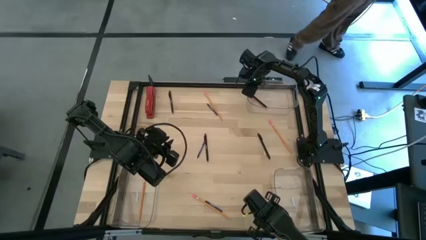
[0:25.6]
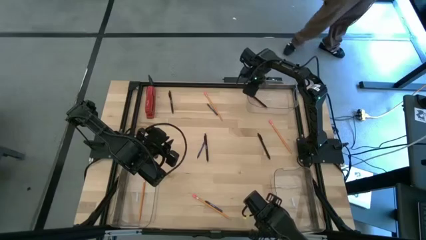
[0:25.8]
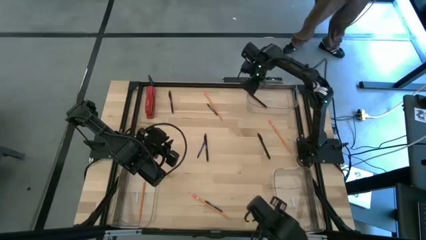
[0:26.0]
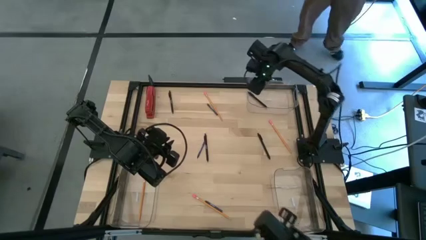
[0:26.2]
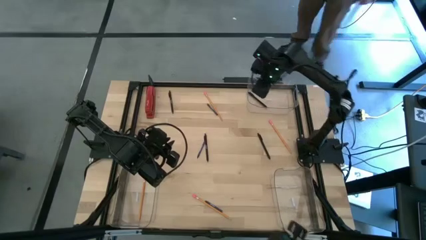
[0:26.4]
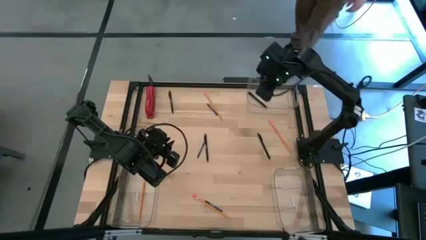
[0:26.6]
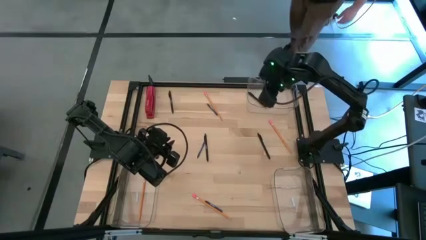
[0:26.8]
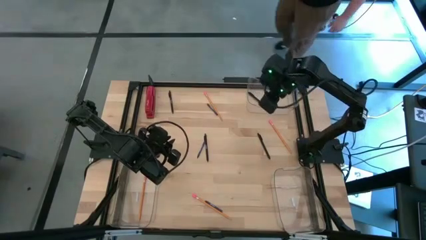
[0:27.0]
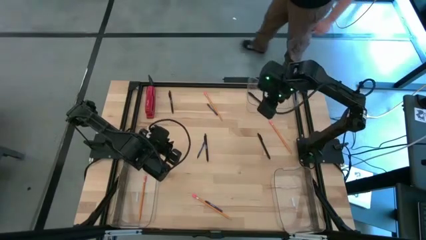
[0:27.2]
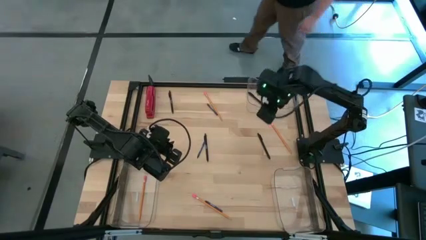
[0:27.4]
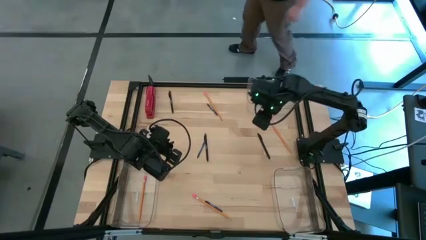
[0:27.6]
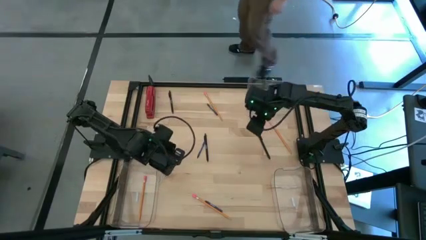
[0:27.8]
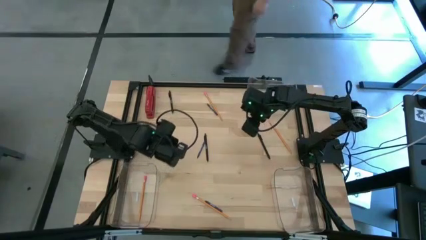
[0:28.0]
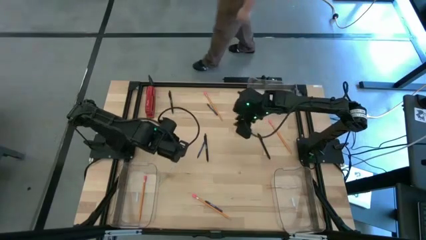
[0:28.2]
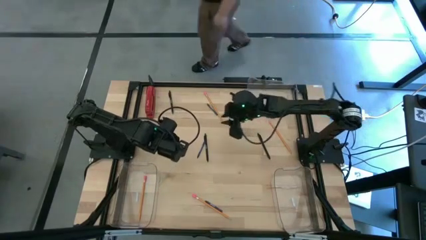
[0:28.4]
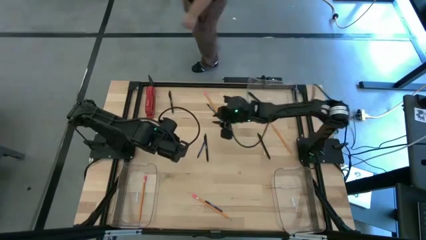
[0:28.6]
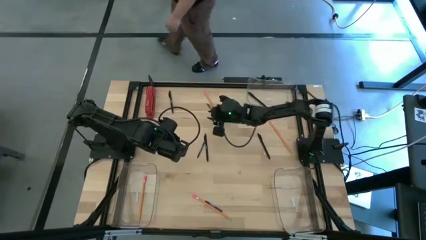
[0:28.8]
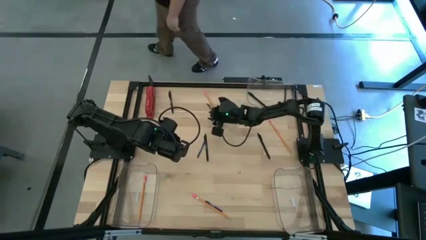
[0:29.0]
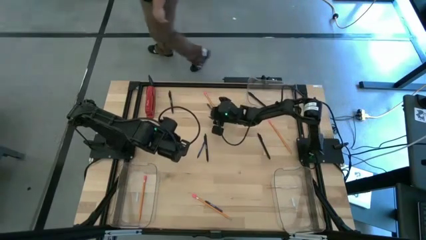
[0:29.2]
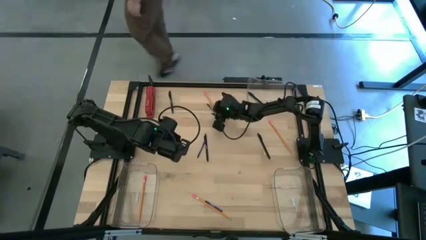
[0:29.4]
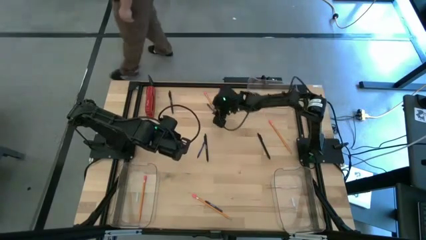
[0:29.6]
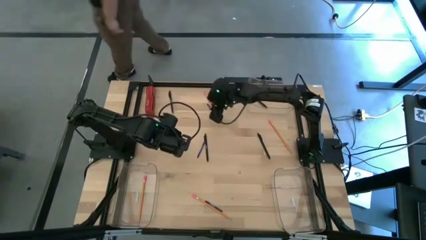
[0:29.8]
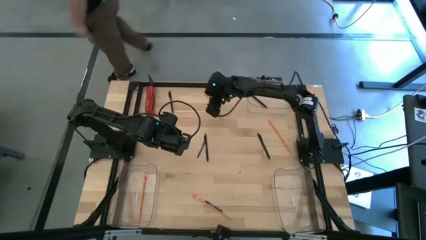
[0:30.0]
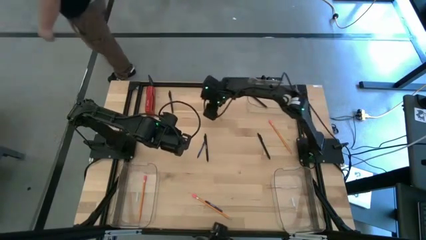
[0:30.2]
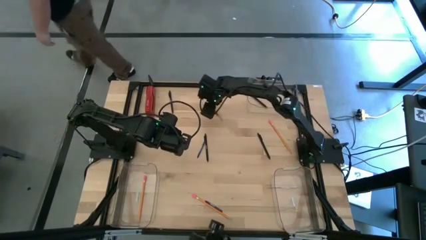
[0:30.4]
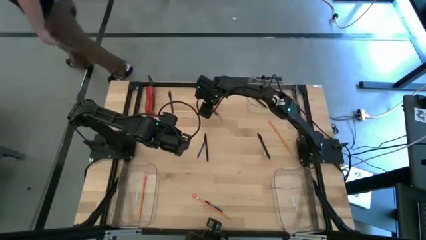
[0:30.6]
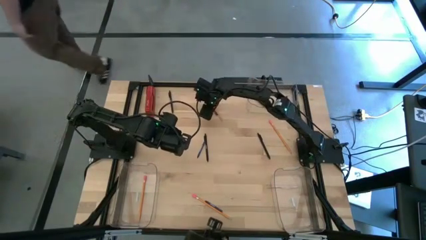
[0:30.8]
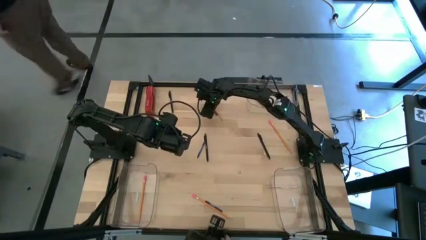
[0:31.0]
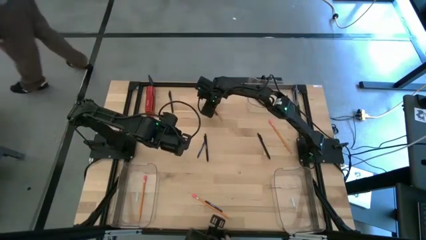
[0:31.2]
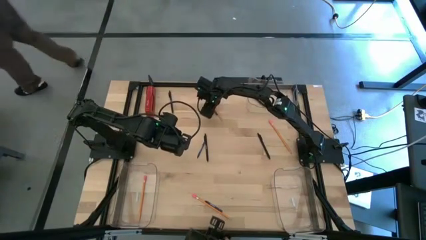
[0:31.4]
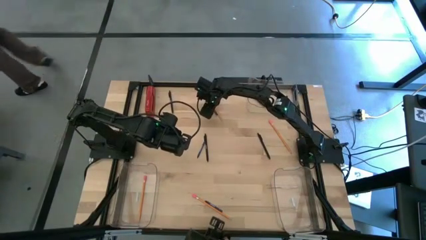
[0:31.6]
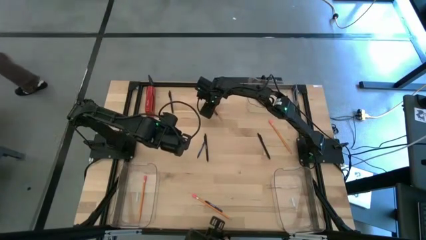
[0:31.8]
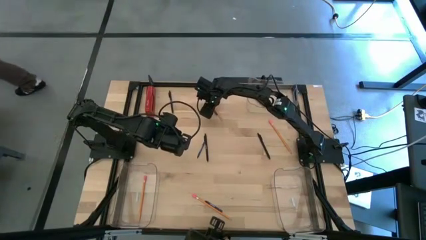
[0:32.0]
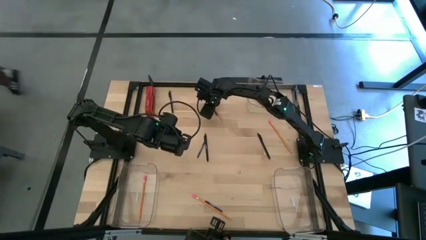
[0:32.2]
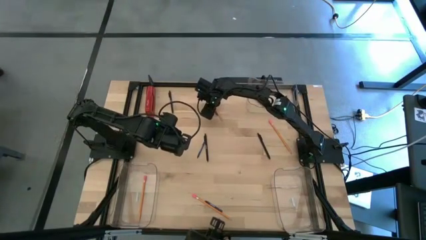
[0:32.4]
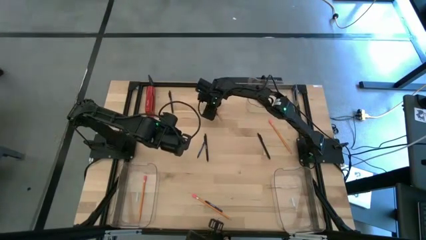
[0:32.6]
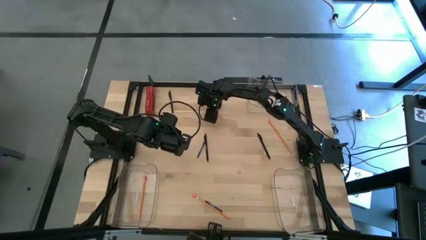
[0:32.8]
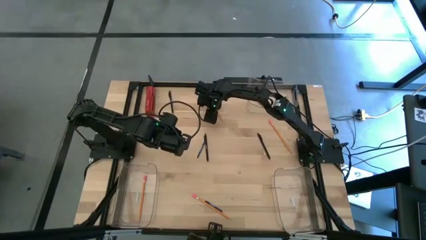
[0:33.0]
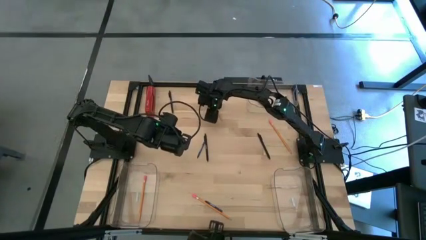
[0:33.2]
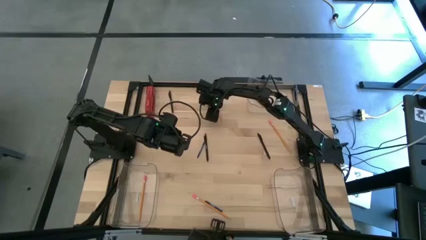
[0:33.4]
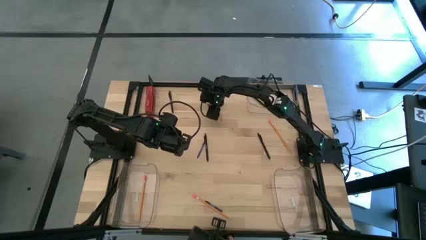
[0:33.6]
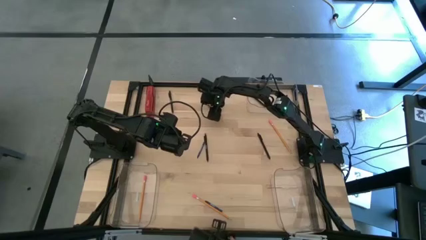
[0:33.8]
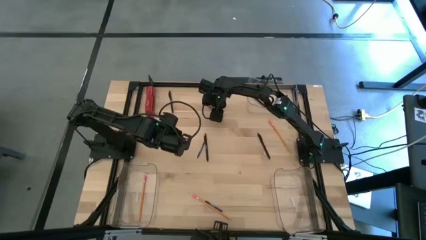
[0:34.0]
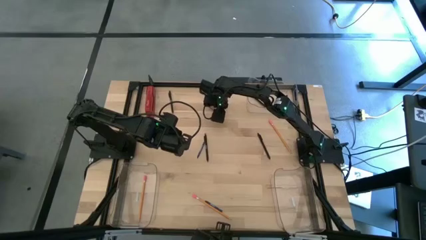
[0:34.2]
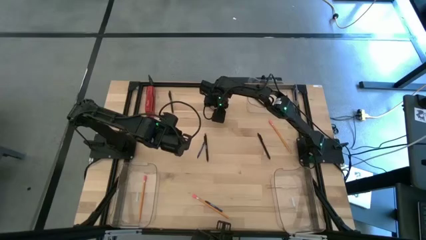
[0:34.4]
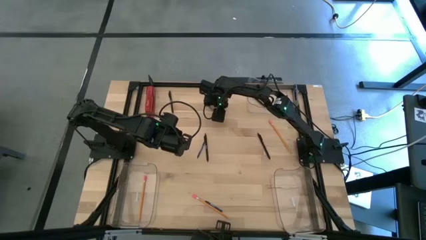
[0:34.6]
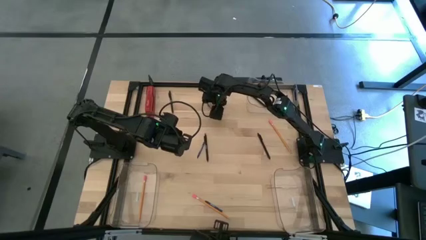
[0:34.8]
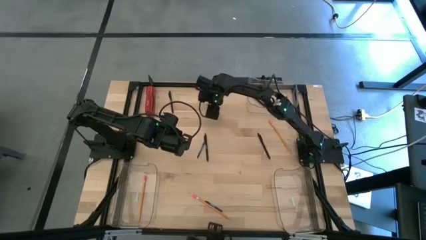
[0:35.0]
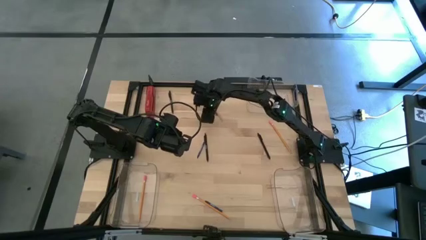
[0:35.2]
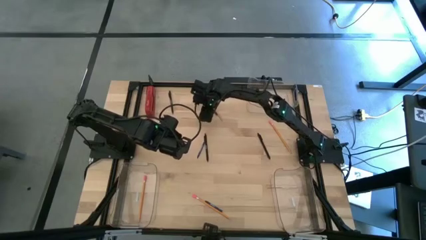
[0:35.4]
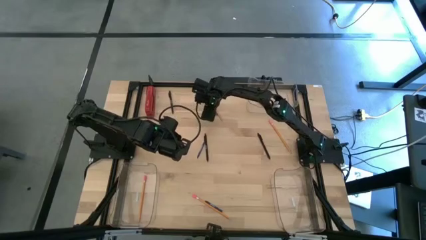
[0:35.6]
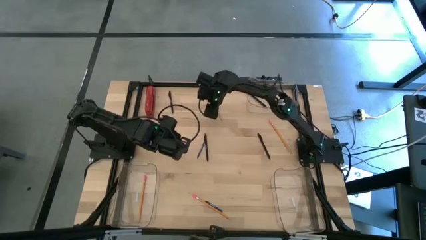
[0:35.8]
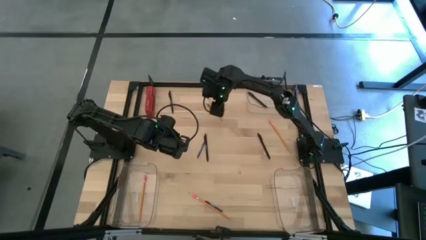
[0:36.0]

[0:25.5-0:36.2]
Task: Sort crayons/erasers/pens/pencils in bins
Put the blue crayon into the bottom right transparent bin
